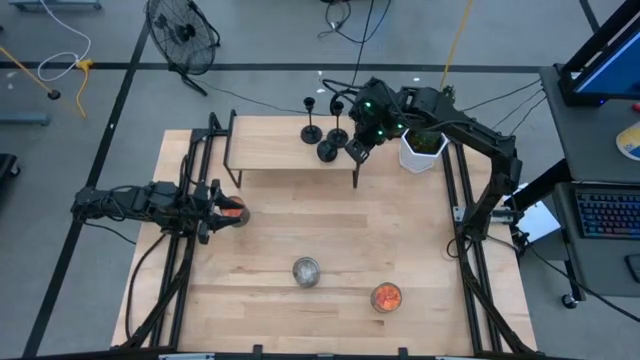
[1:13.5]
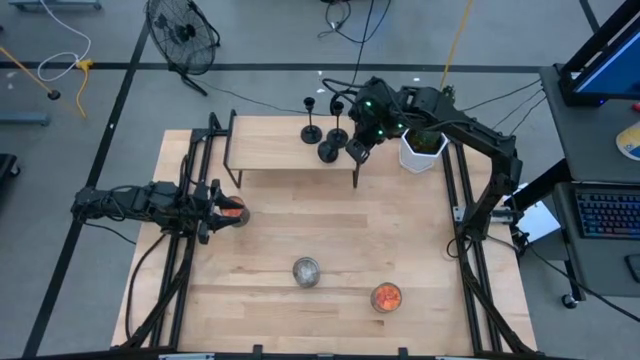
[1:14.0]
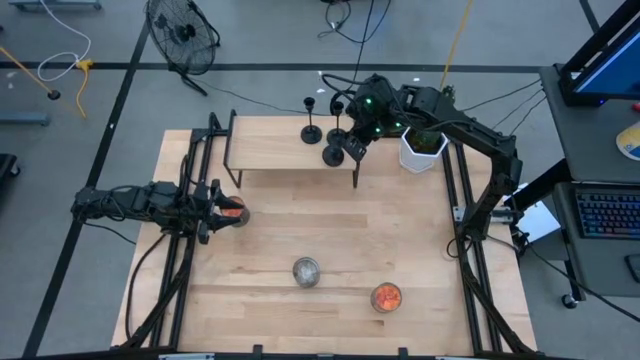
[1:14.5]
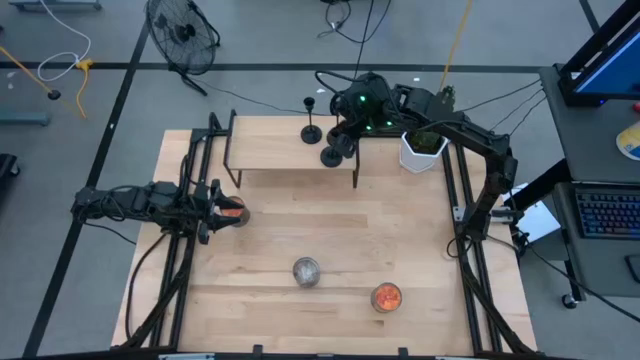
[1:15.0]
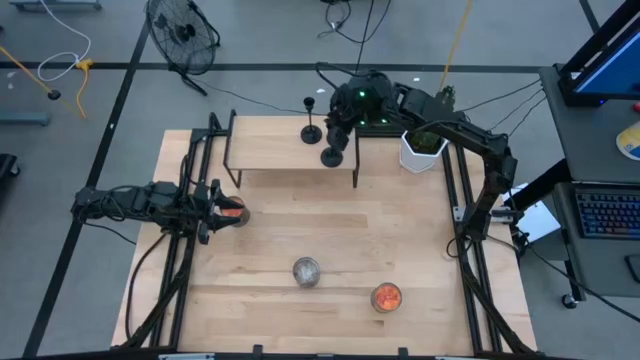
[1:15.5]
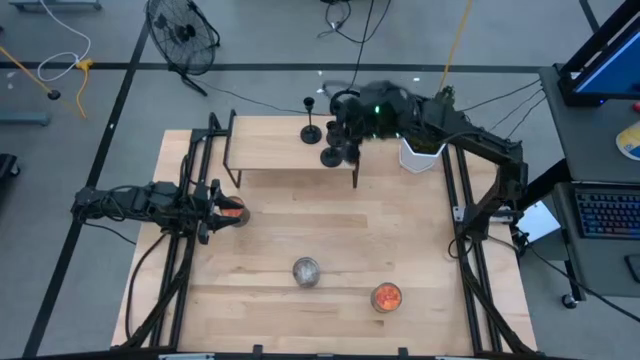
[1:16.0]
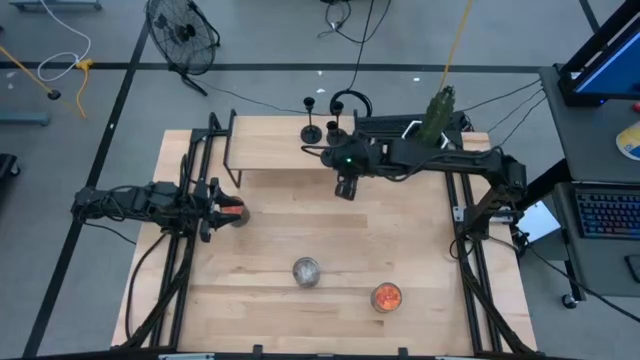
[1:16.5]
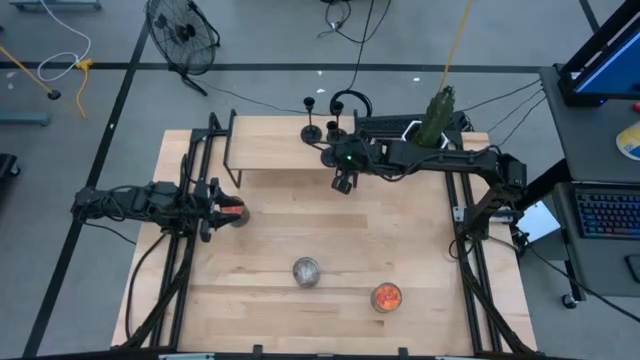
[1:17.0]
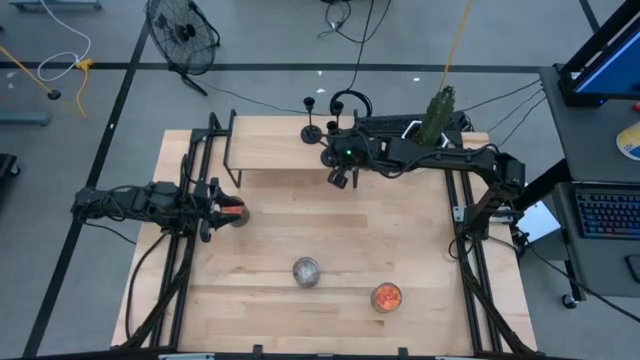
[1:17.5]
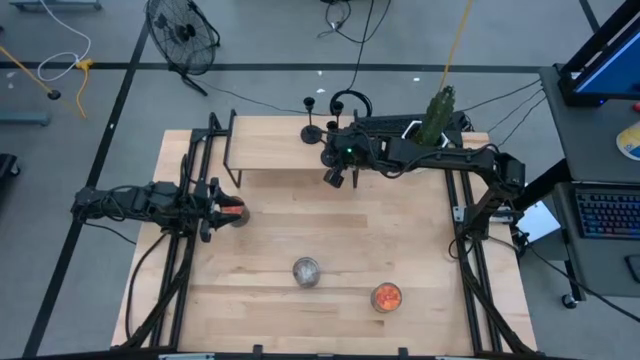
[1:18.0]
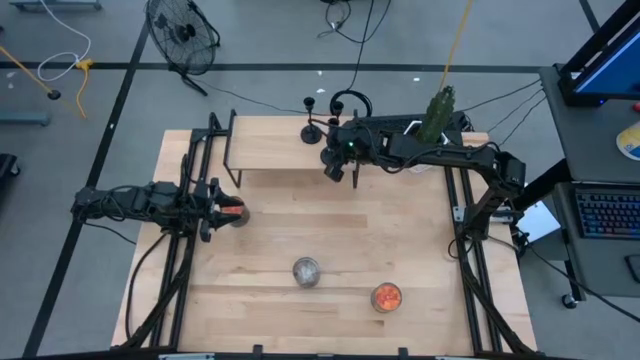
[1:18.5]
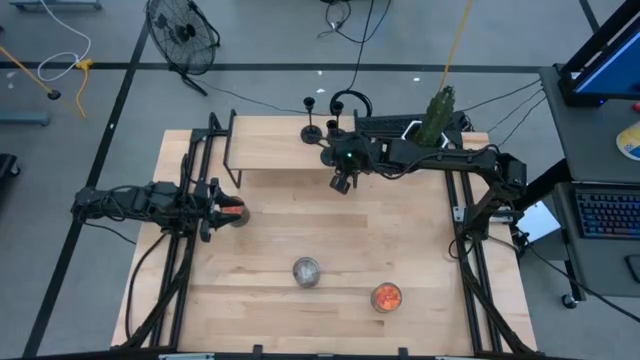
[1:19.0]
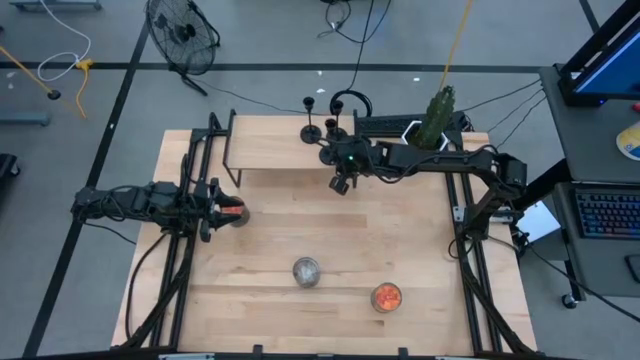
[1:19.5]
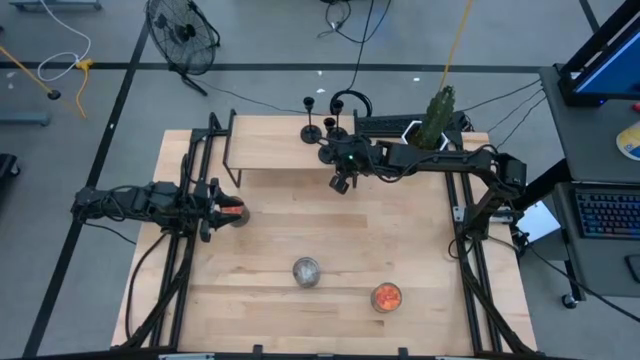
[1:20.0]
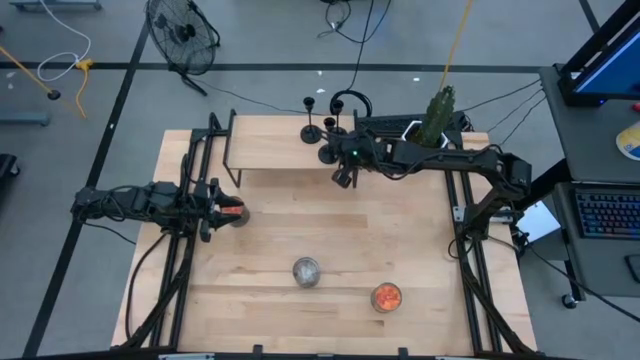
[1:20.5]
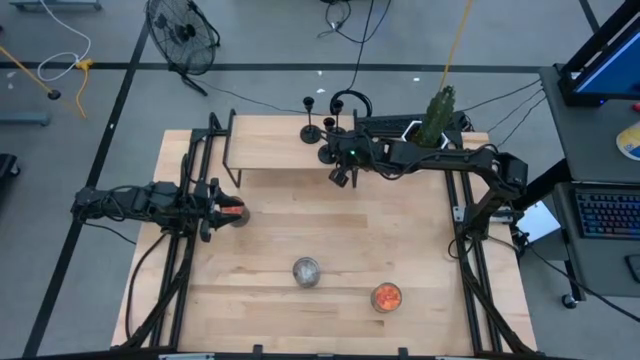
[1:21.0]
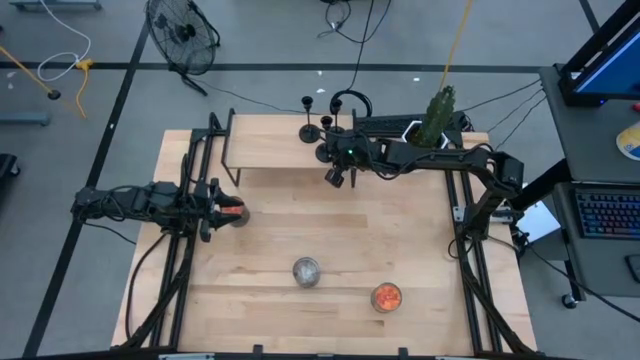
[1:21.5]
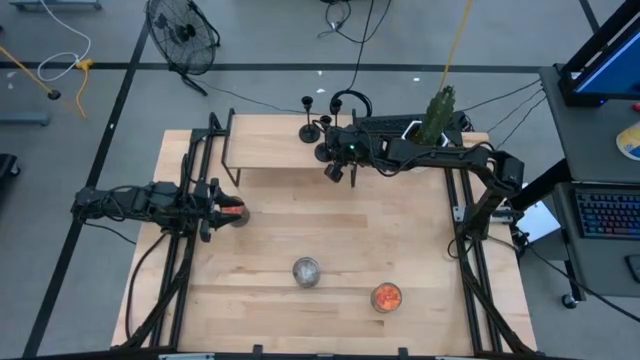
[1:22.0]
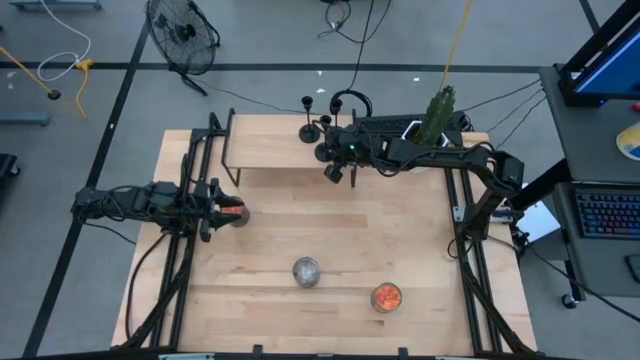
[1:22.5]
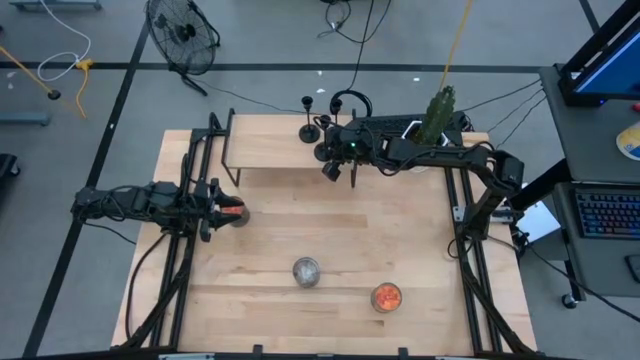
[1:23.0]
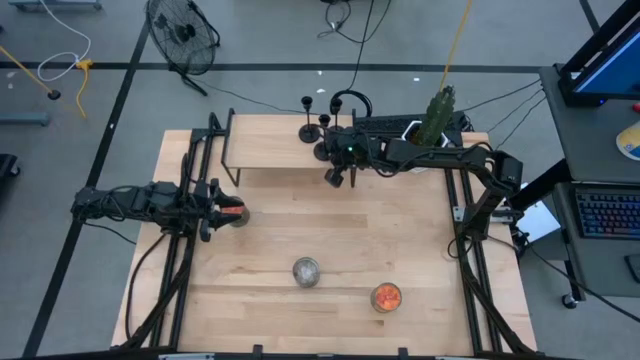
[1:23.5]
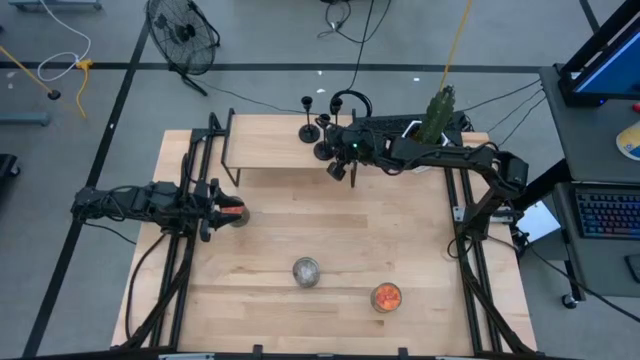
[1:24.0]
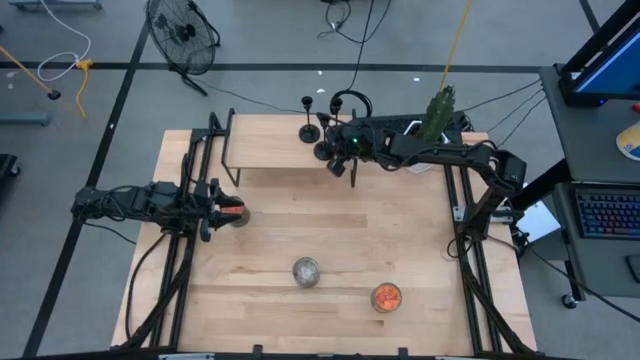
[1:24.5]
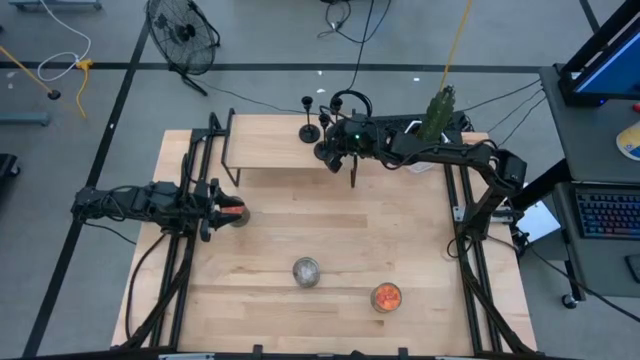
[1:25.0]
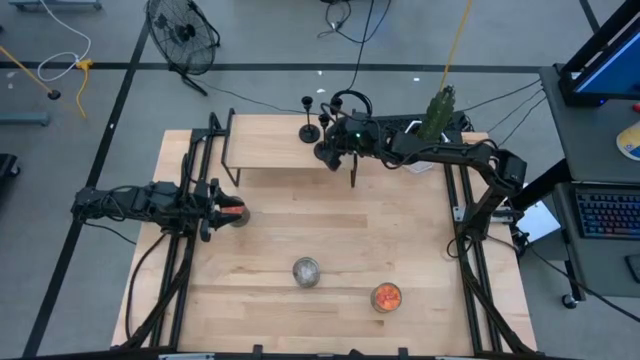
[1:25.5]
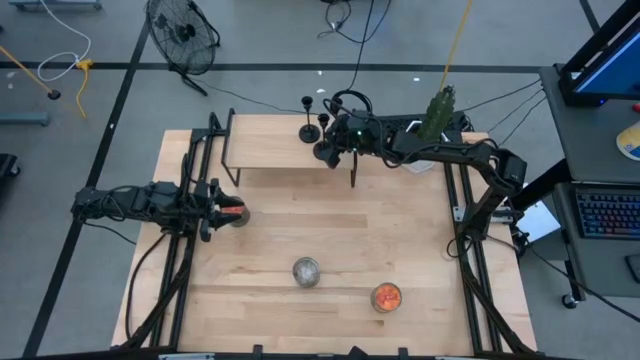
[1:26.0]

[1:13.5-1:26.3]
Task: Pick & Place candle stick holders
Put the black candle holder on the shelf

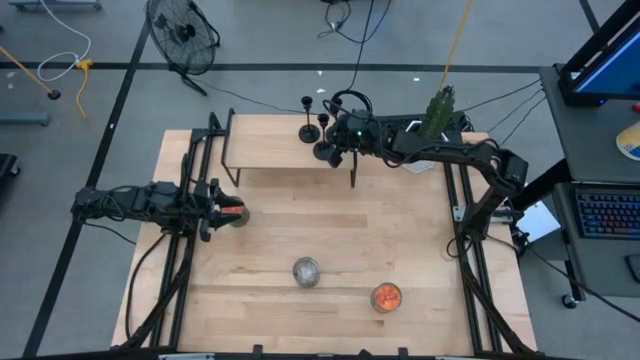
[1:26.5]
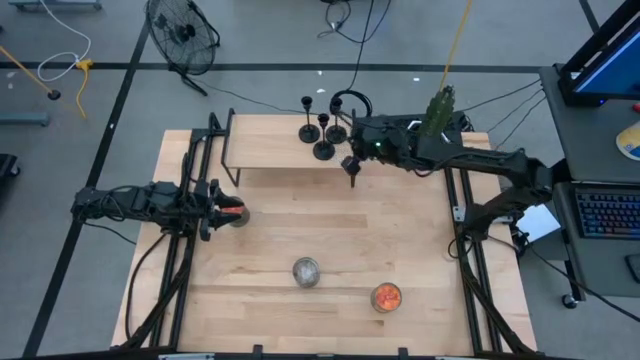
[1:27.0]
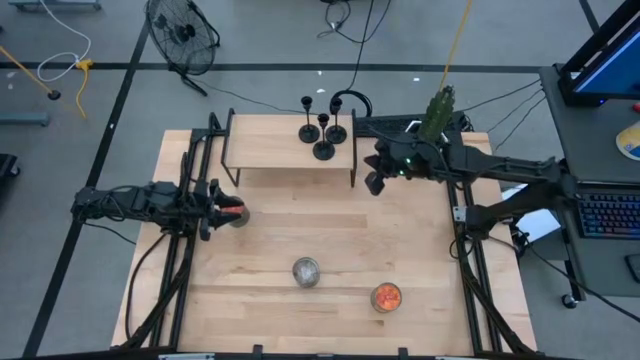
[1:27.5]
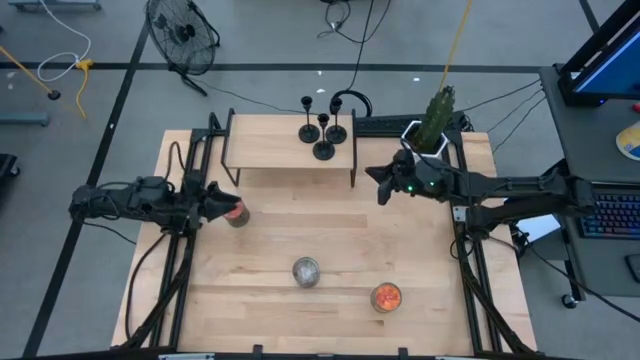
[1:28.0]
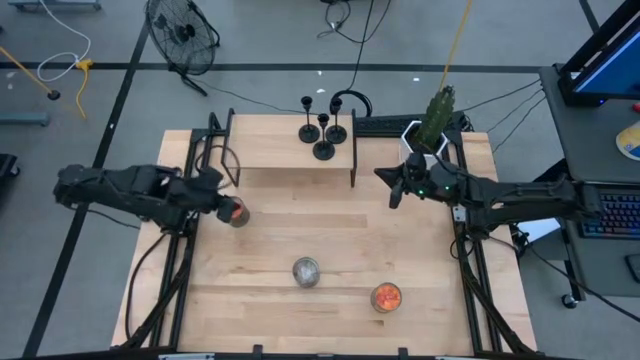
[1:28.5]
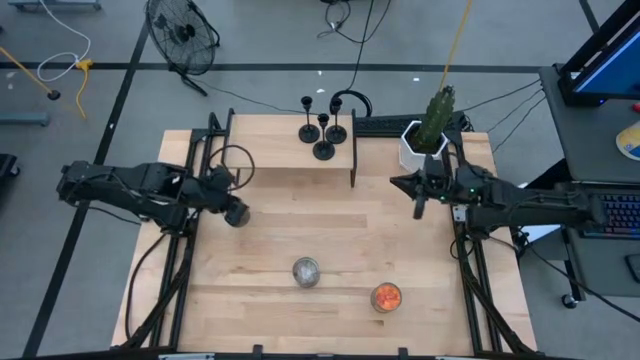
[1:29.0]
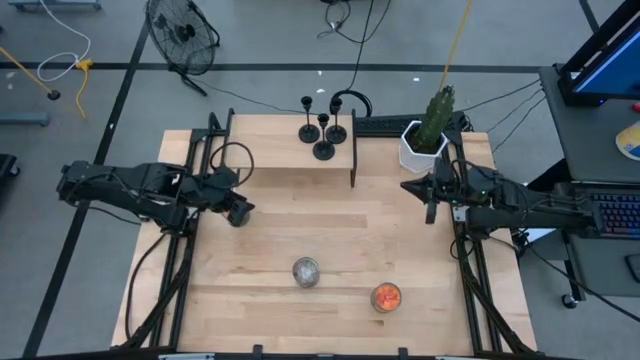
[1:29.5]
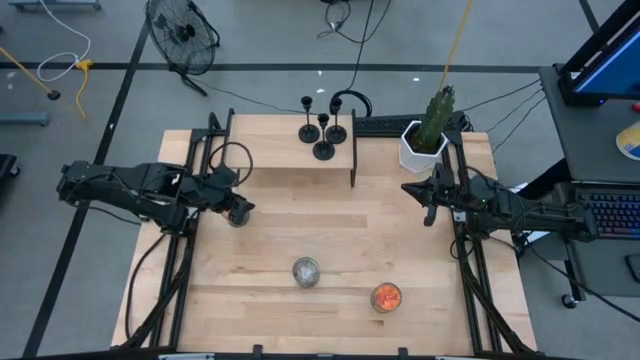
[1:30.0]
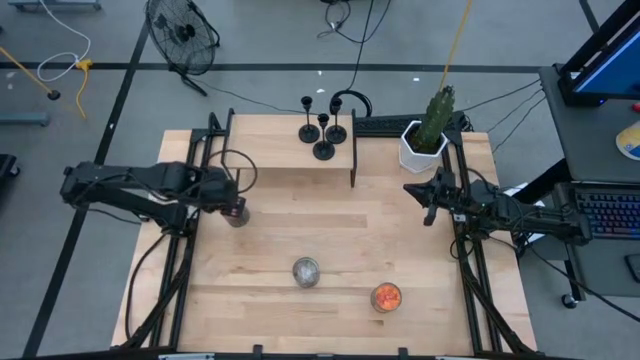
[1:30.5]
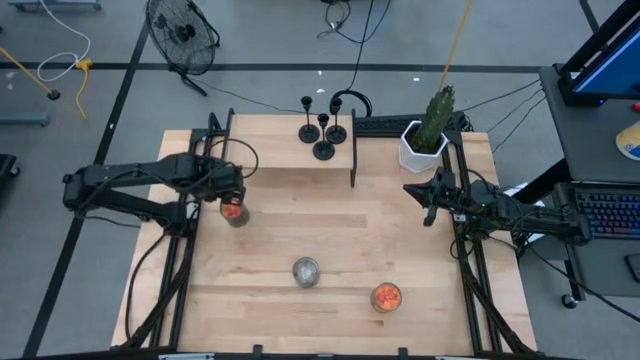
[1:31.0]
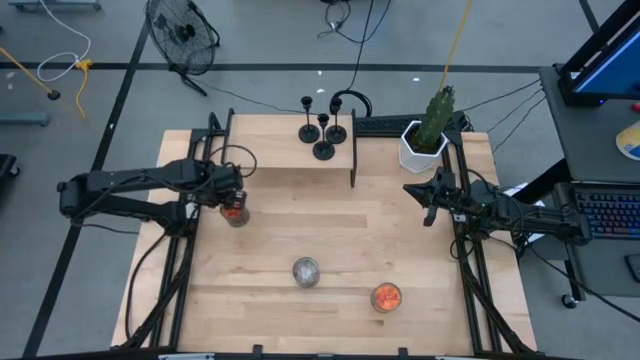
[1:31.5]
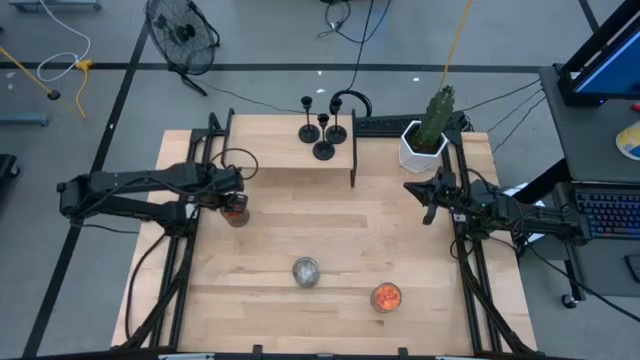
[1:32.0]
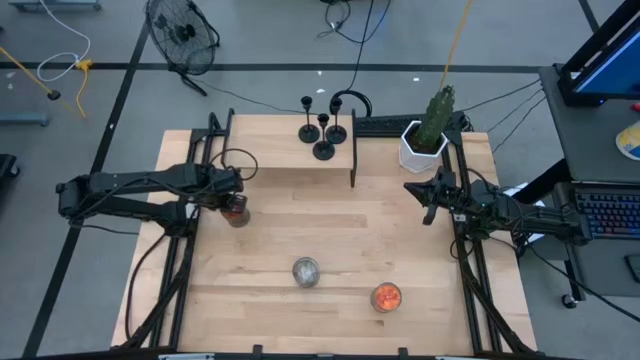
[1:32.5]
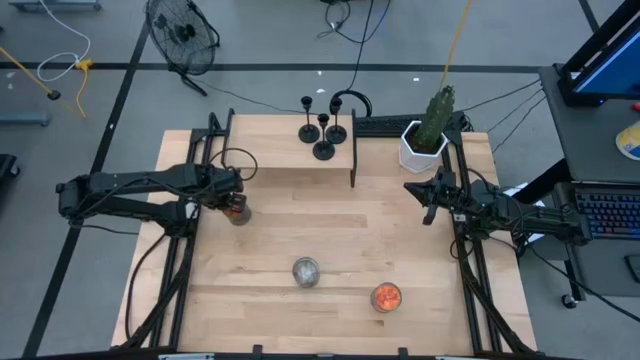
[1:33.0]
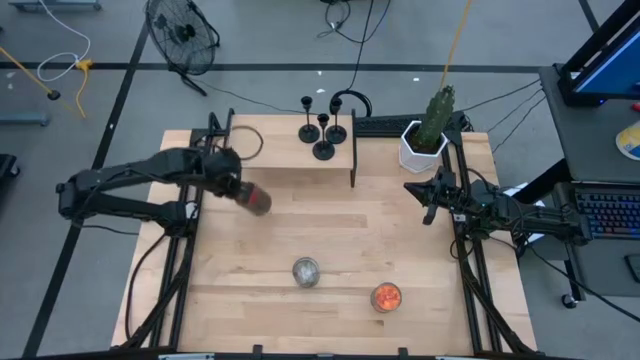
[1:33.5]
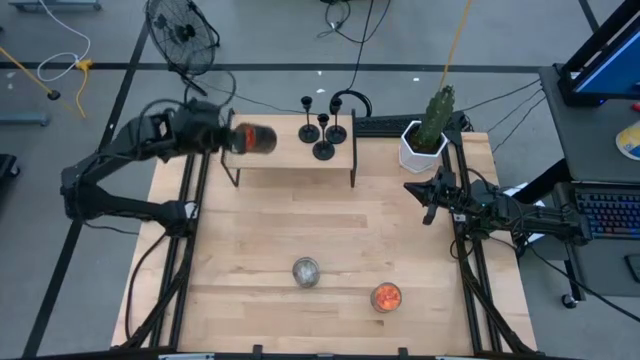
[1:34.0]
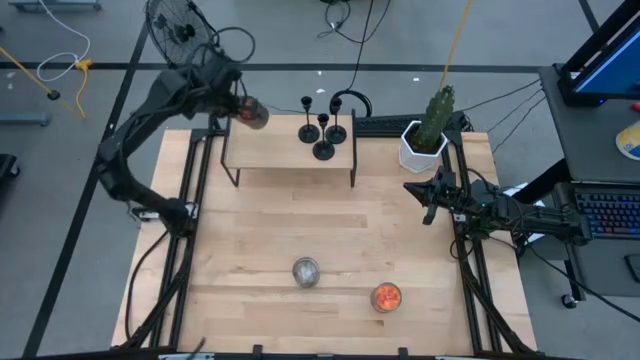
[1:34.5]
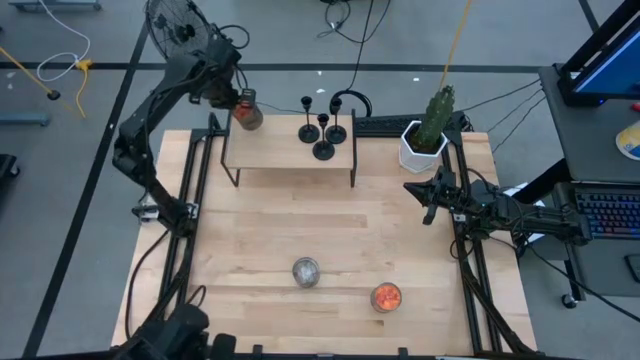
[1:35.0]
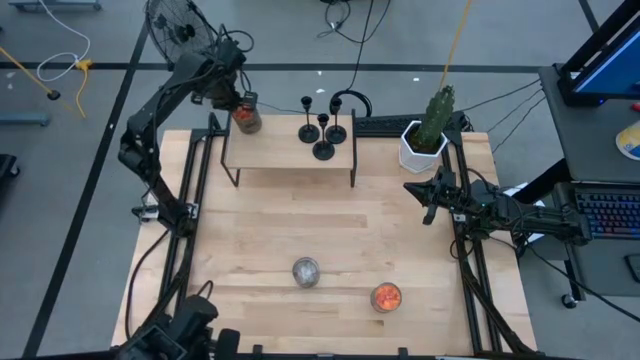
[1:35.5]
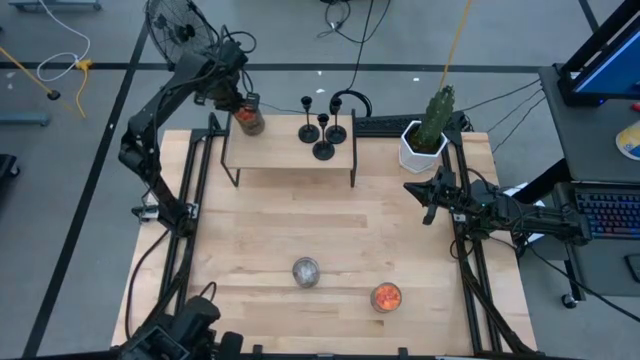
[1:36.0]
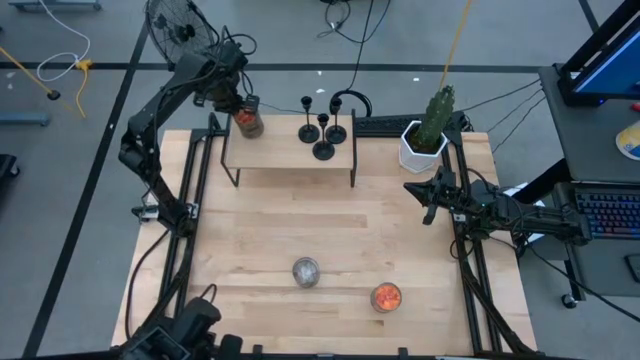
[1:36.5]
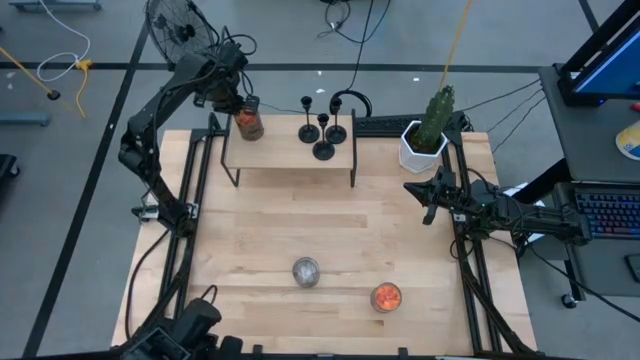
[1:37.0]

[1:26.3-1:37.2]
Put the top orange scented candle on the shelf
